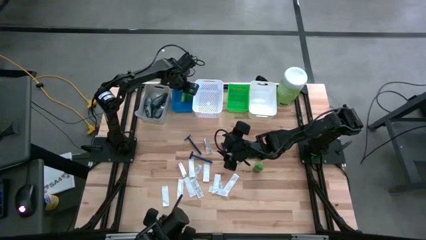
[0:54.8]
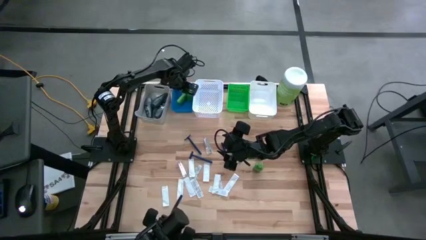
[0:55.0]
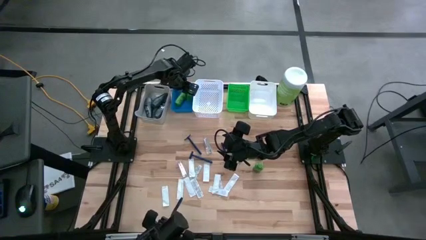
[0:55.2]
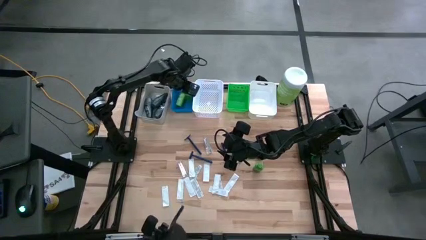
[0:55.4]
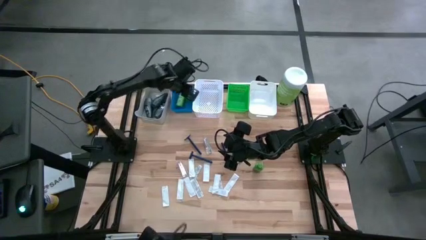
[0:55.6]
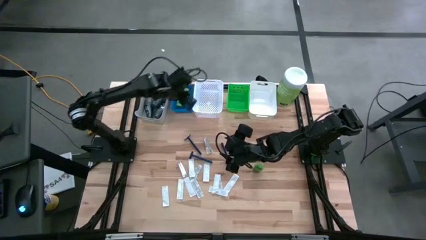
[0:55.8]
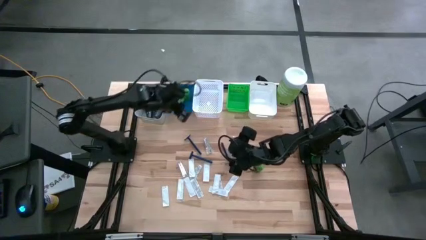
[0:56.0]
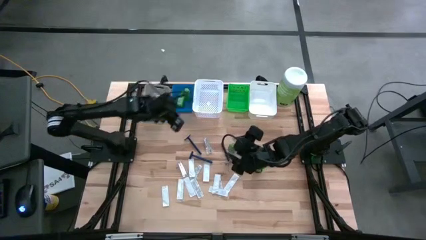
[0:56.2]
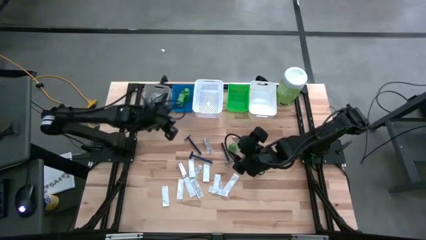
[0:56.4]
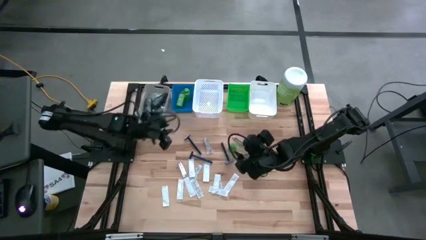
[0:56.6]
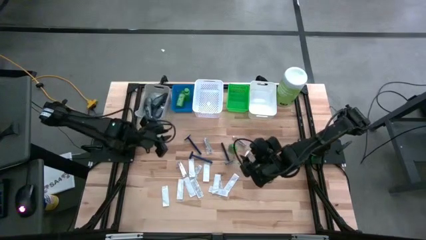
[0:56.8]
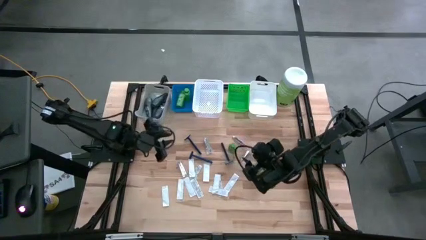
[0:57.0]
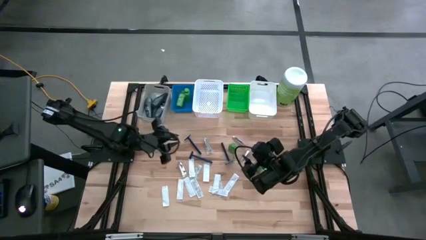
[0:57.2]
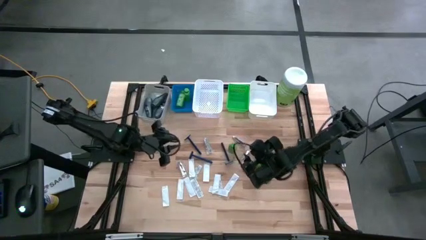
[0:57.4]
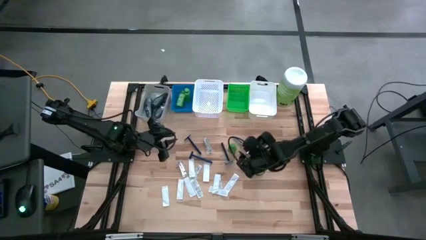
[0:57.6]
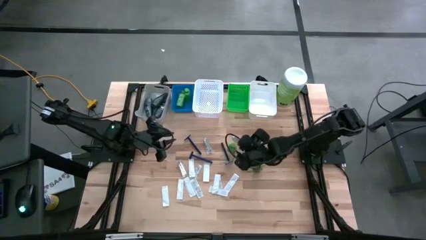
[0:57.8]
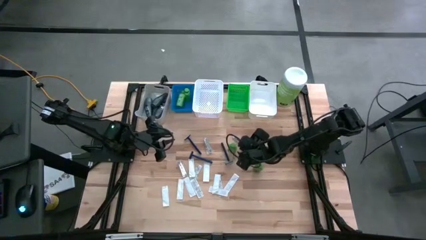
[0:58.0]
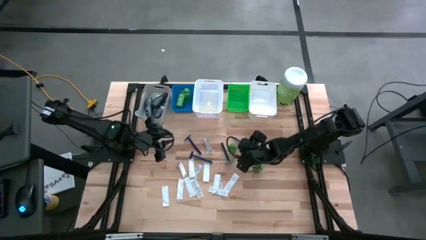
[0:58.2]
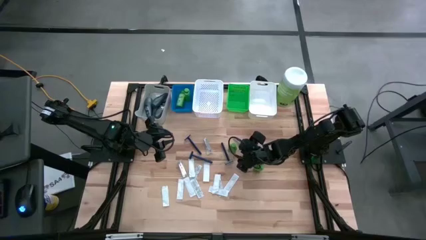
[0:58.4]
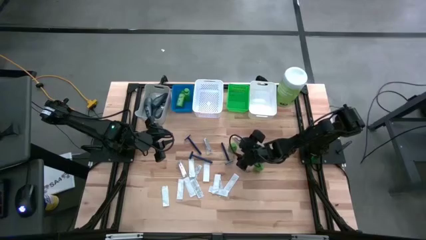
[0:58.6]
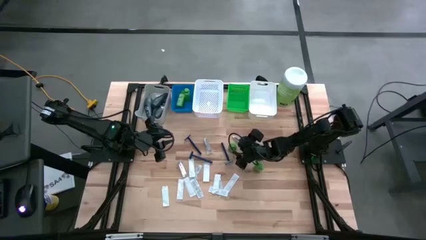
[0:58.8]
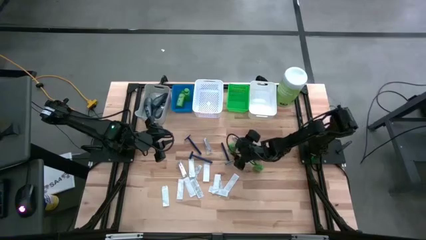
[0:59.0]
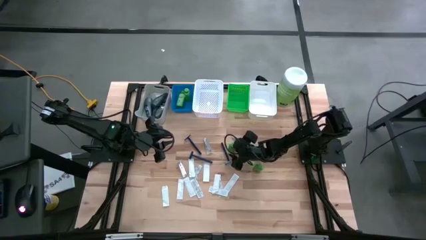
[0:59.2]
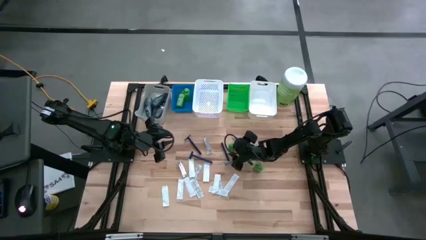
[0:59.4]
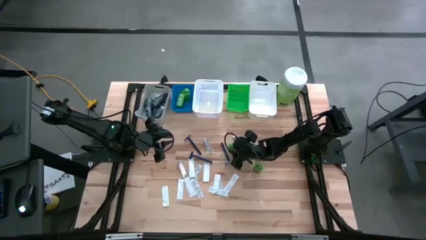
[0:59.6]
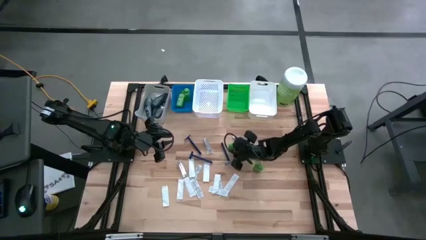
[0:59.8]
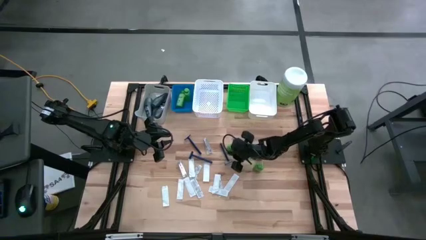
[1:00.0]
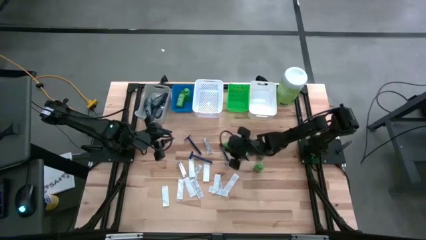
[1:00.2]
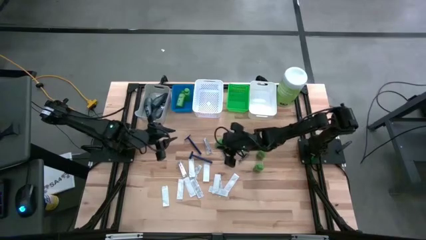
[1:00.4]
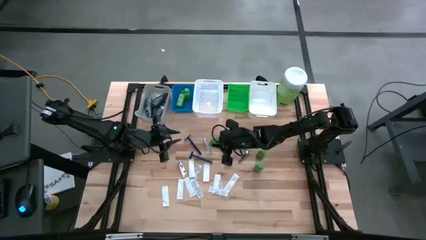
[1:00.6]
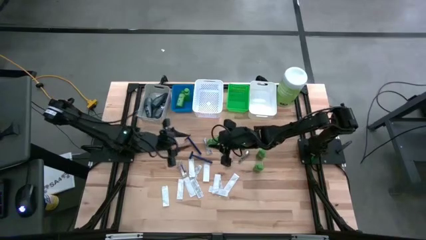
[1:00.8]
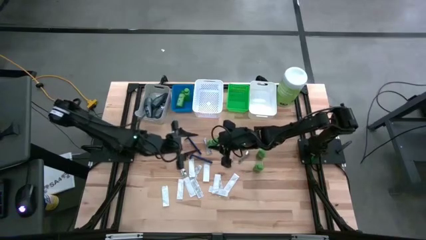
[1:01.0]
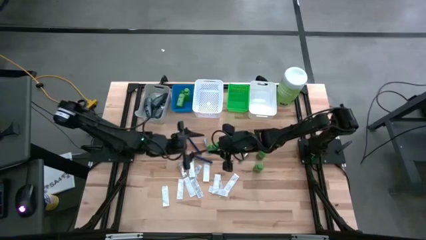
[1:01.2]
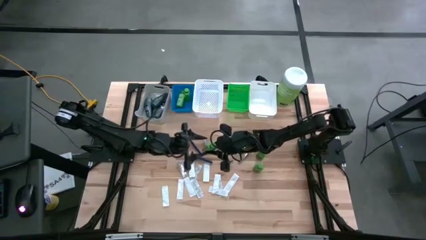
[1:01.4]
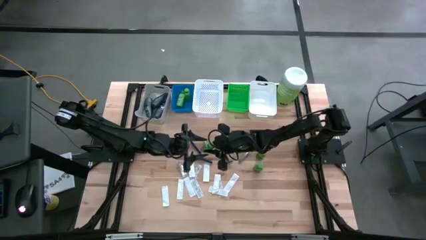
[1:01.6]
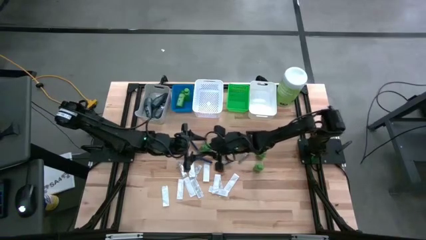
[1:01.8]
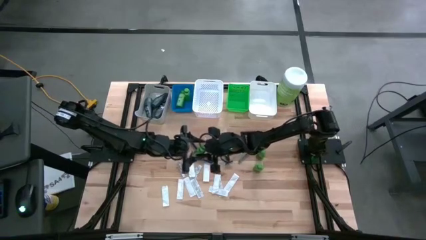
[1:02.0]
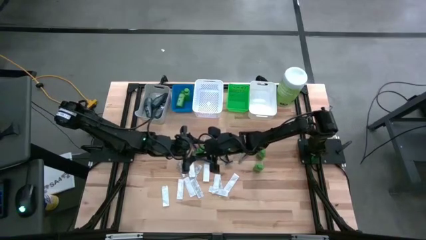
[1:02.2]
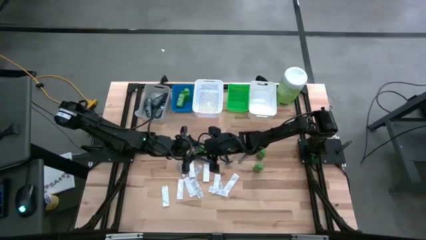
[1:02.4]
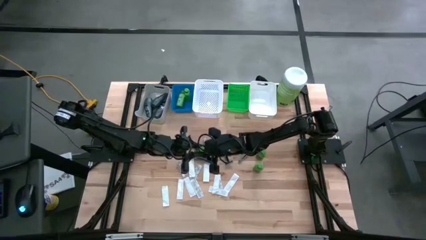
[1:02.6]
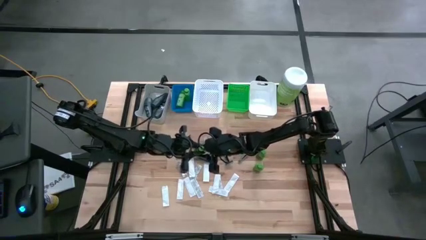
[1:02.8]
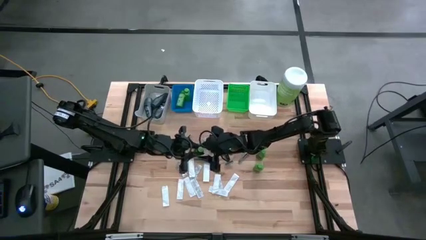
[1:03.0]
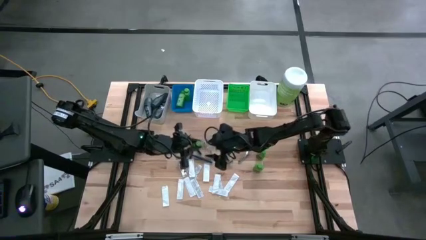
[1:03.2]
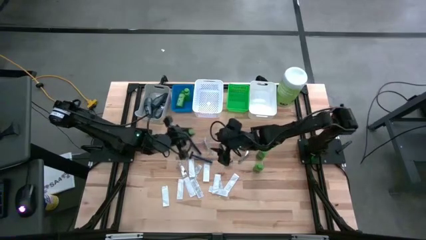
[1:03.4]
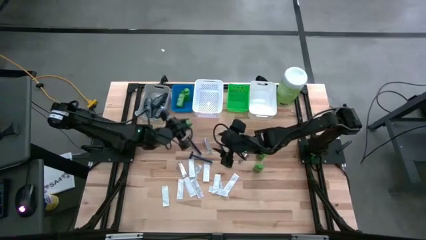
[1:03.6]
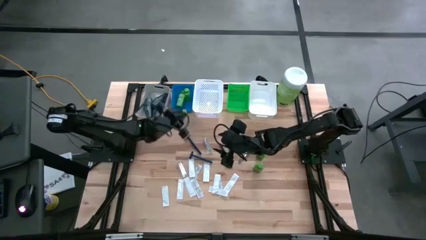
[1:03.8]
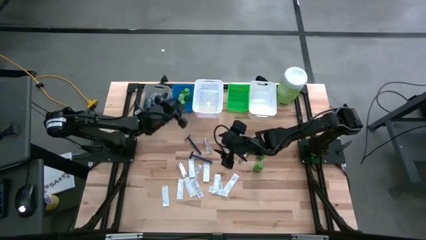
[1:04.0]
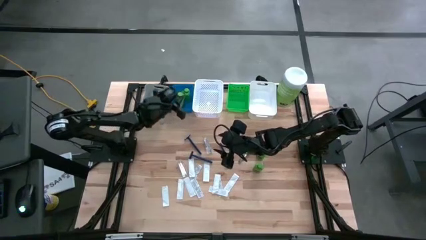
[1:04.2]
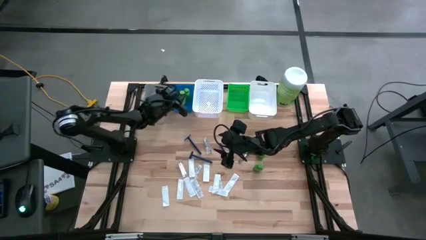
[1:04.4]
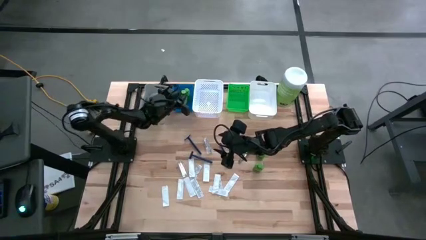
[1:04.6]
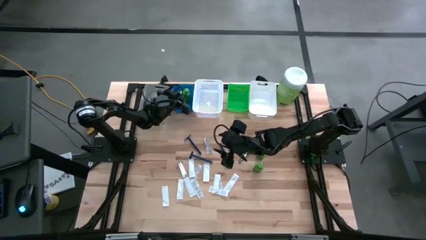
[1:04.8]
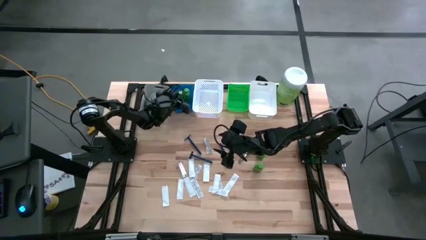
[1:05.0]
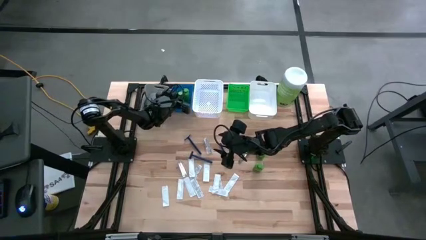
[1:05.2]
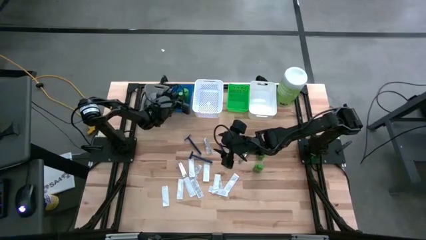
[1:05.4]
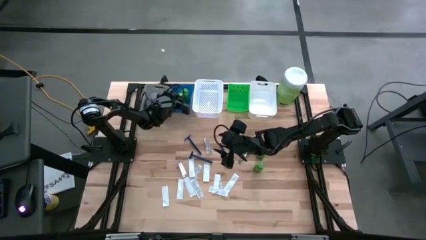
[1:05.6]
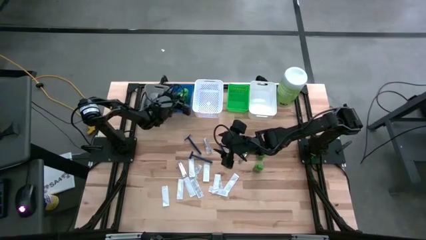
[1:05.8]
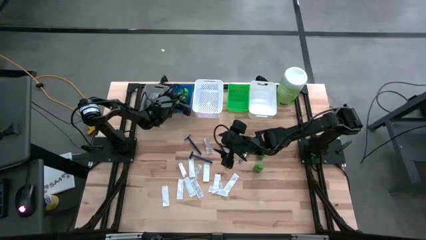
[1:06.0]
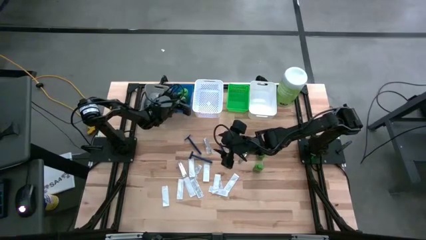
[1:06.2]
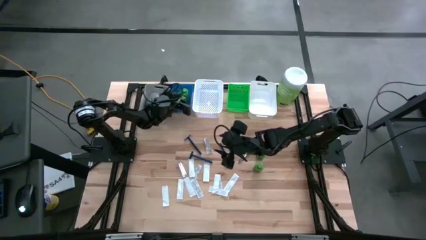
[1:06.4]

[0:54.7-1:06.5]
Task: Pick & Place Travel size toiletries
Put the shampoo into the blue bin
